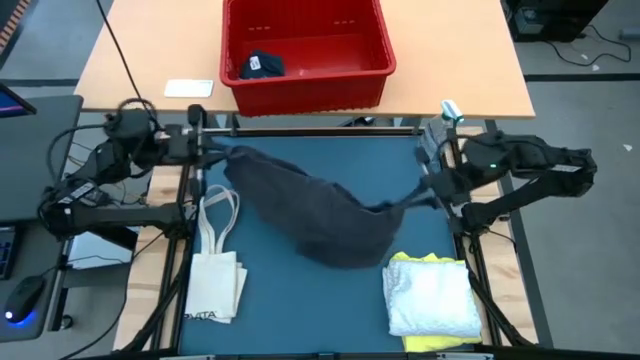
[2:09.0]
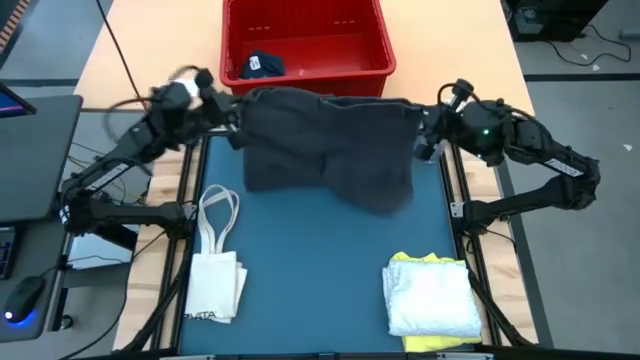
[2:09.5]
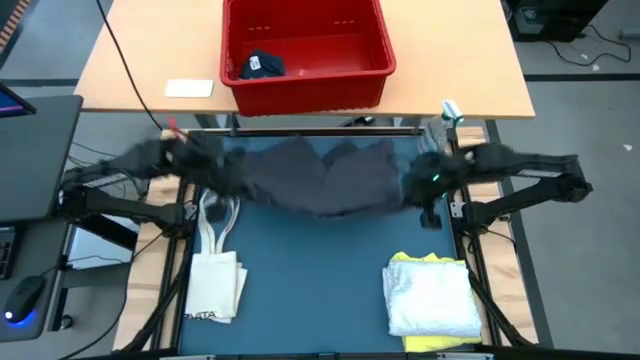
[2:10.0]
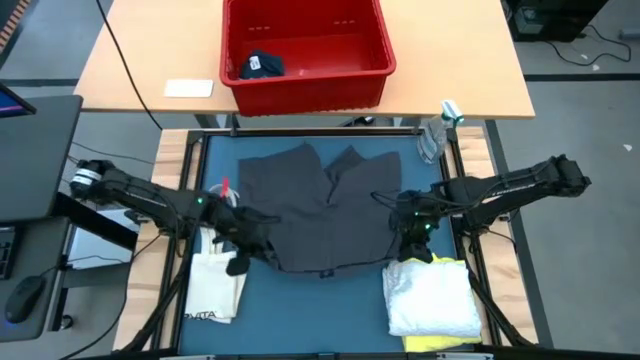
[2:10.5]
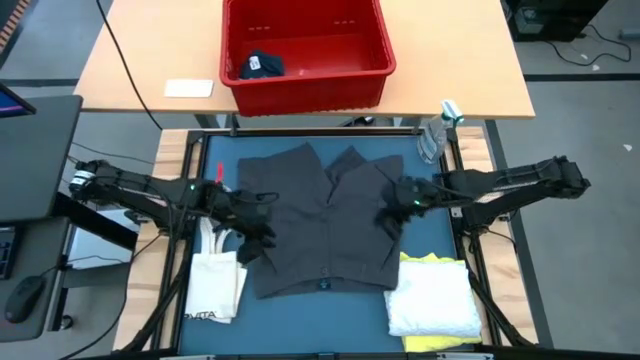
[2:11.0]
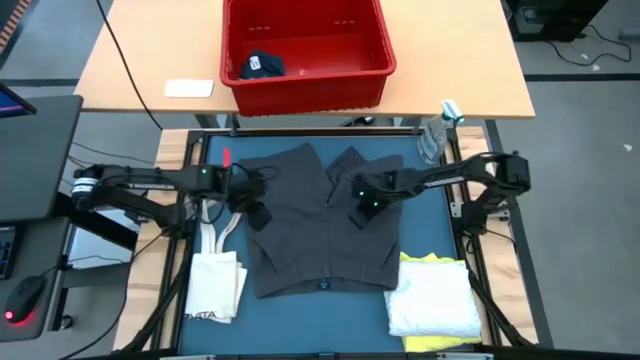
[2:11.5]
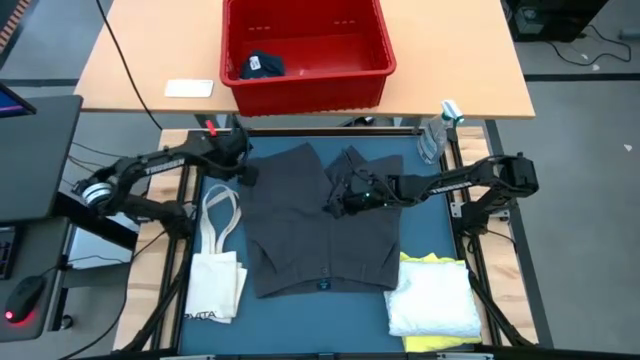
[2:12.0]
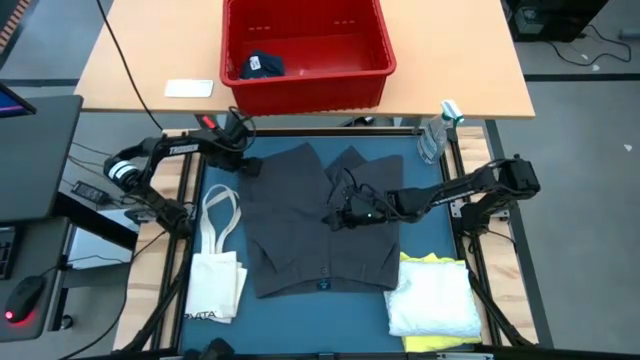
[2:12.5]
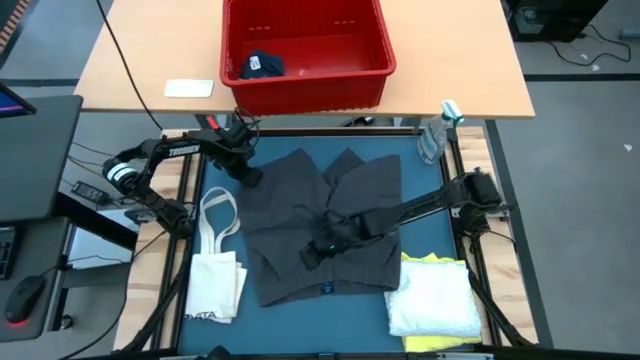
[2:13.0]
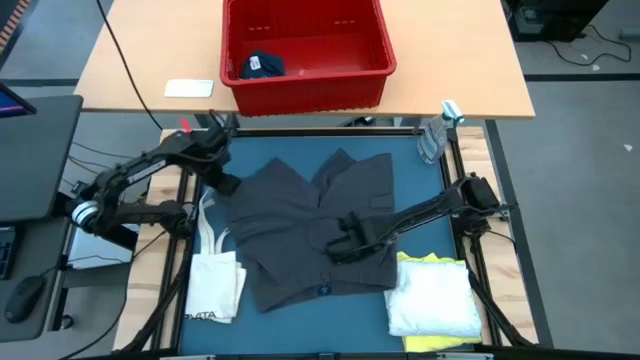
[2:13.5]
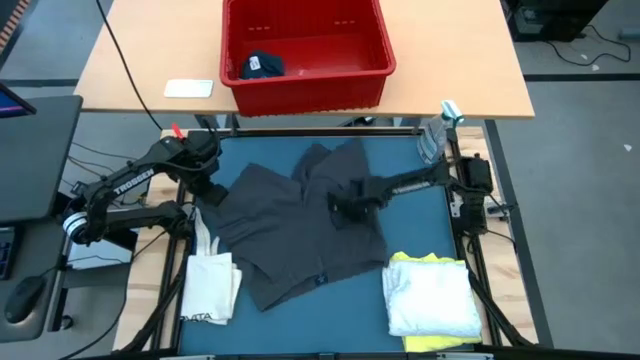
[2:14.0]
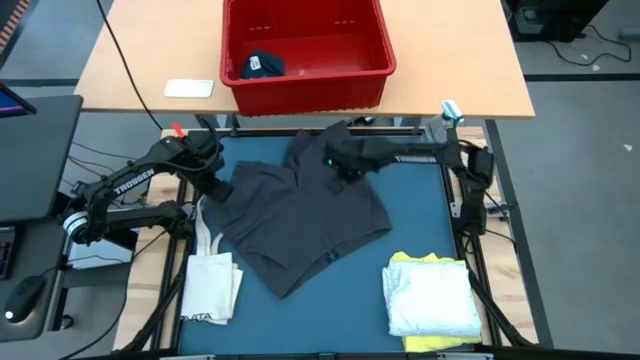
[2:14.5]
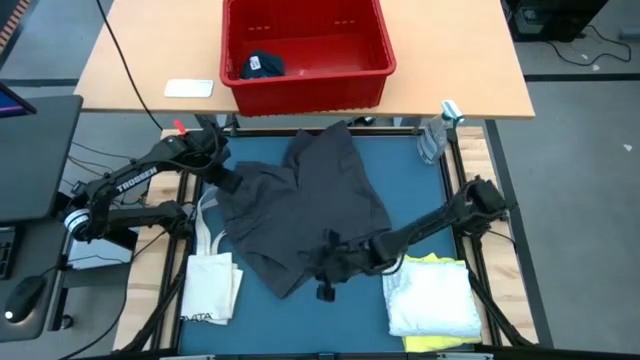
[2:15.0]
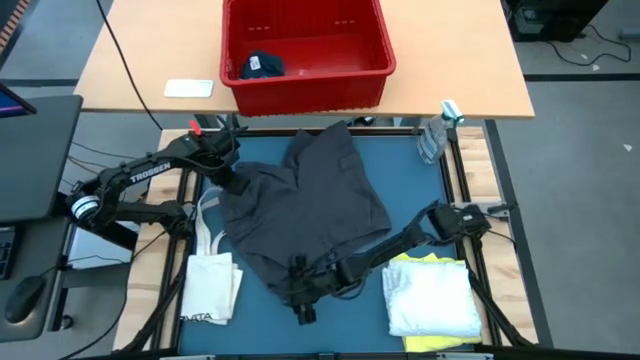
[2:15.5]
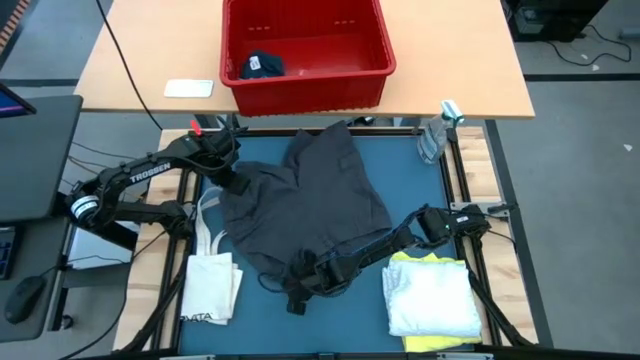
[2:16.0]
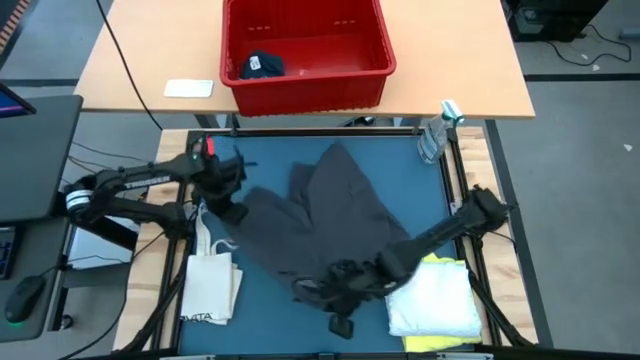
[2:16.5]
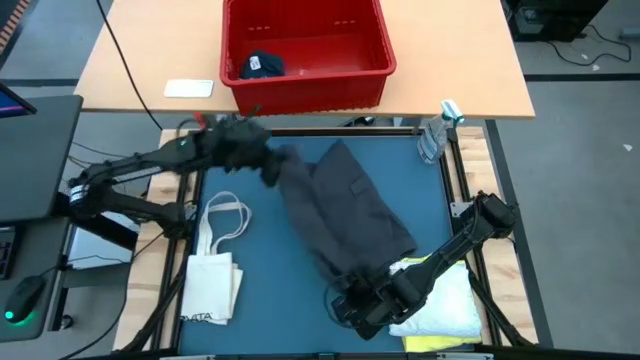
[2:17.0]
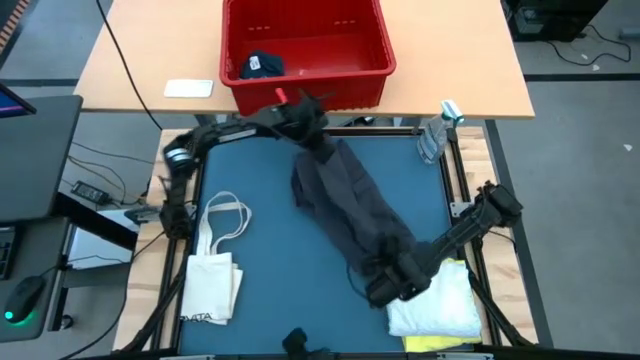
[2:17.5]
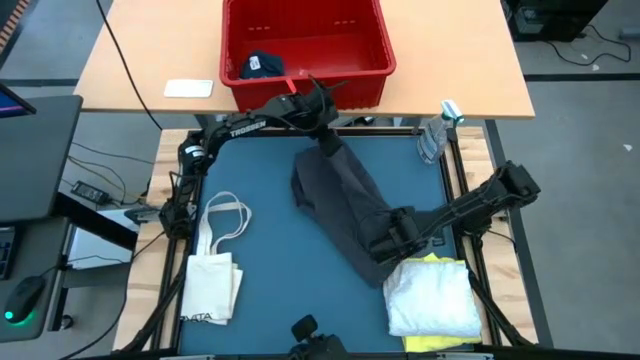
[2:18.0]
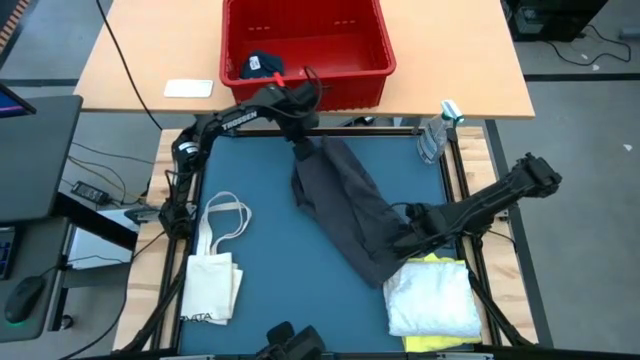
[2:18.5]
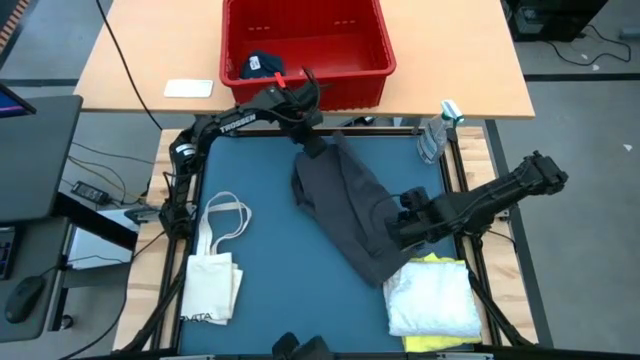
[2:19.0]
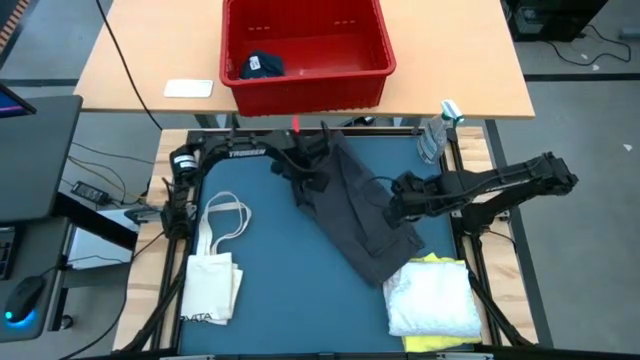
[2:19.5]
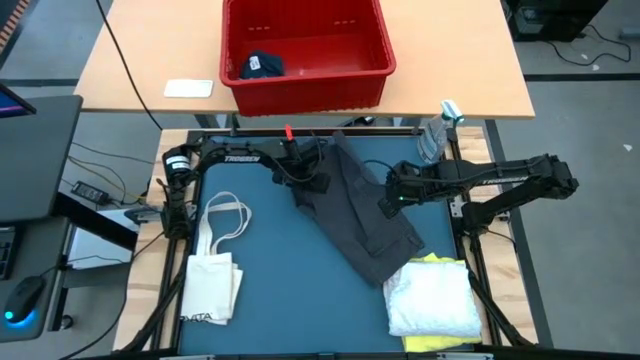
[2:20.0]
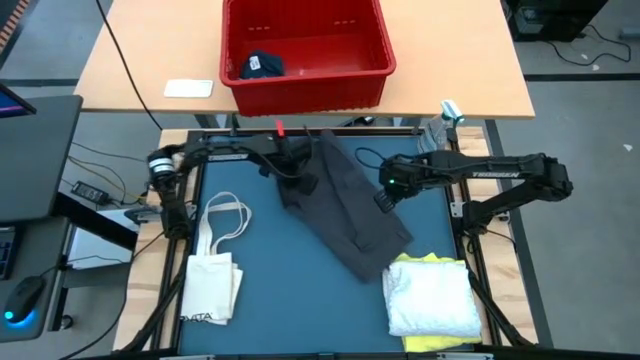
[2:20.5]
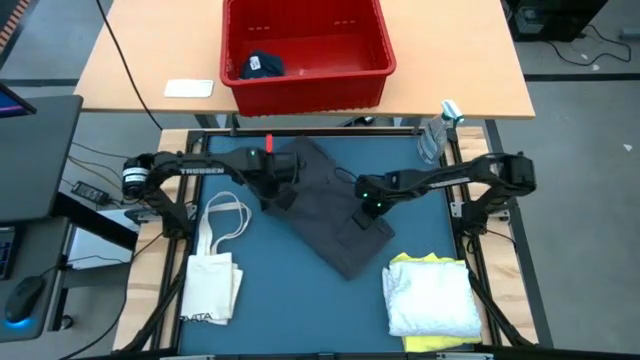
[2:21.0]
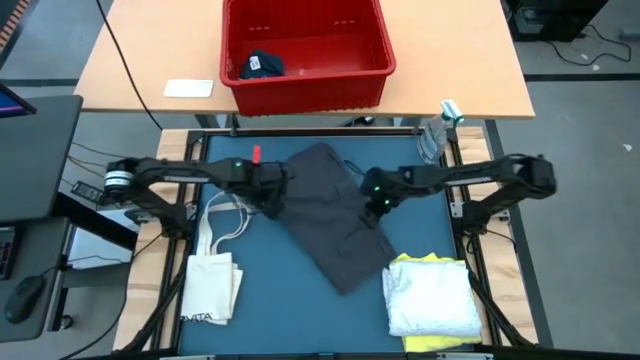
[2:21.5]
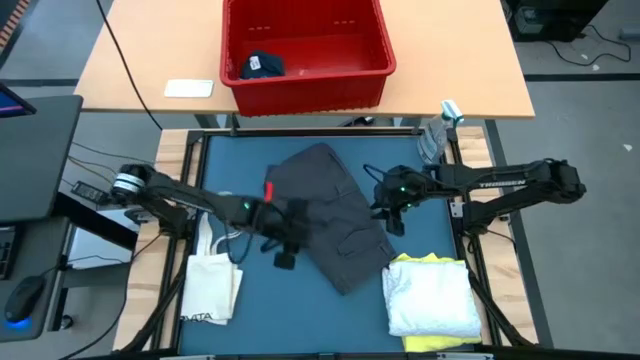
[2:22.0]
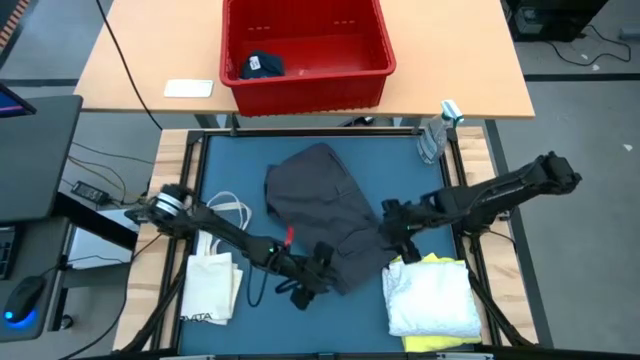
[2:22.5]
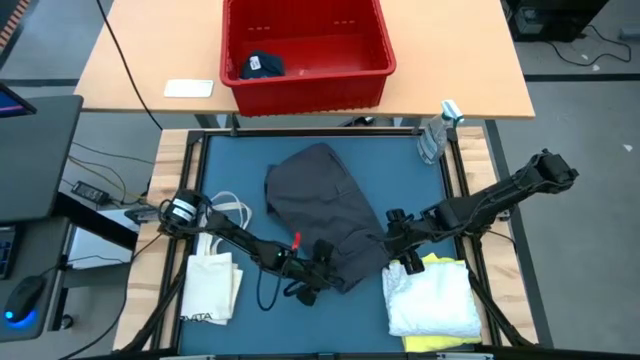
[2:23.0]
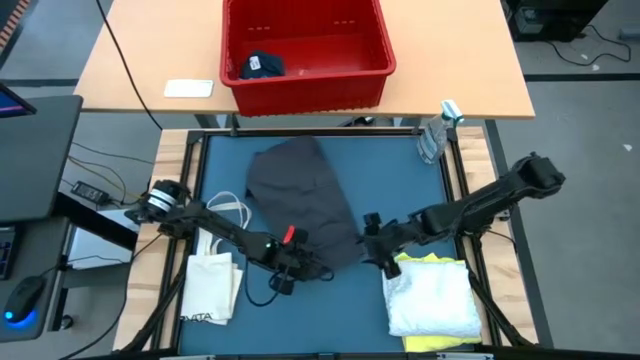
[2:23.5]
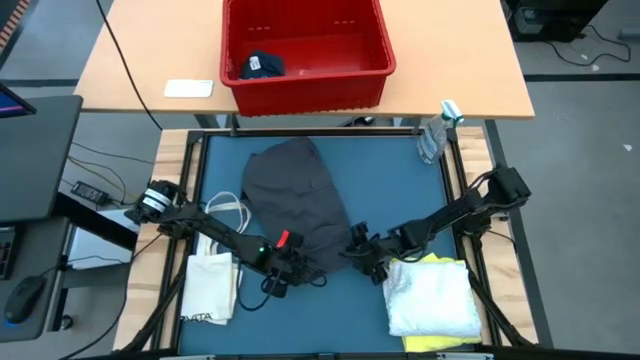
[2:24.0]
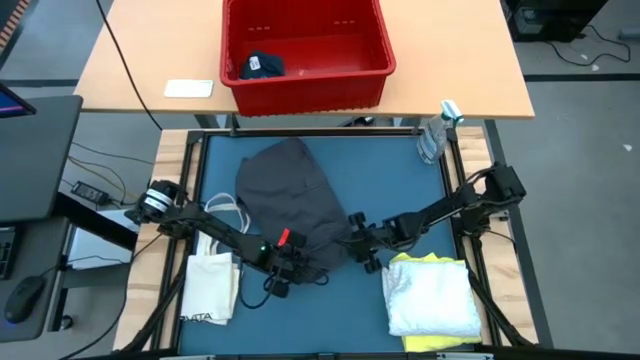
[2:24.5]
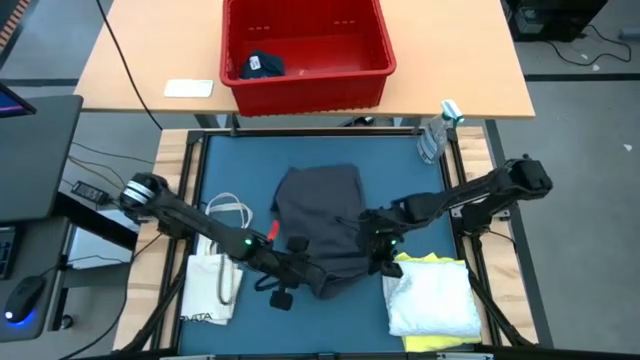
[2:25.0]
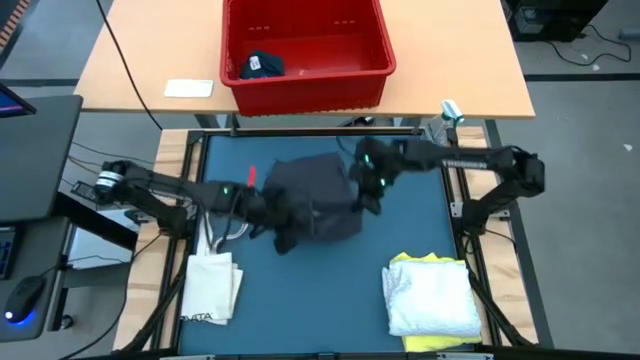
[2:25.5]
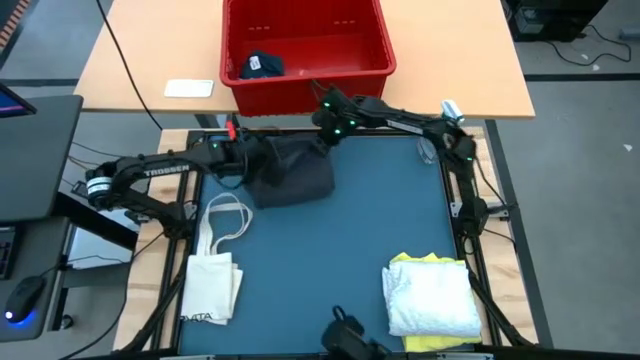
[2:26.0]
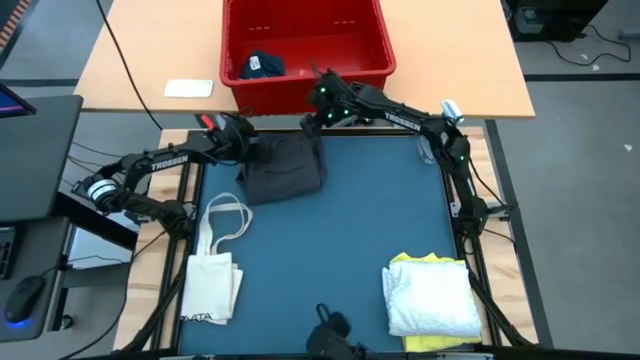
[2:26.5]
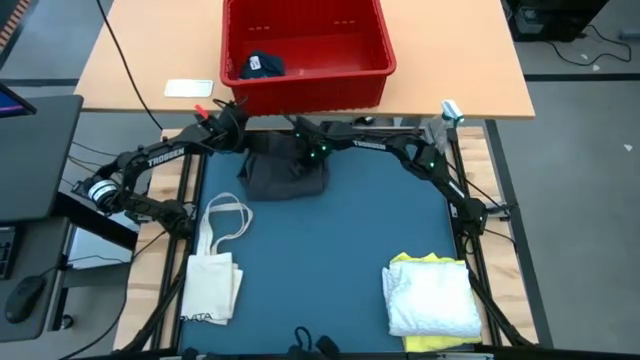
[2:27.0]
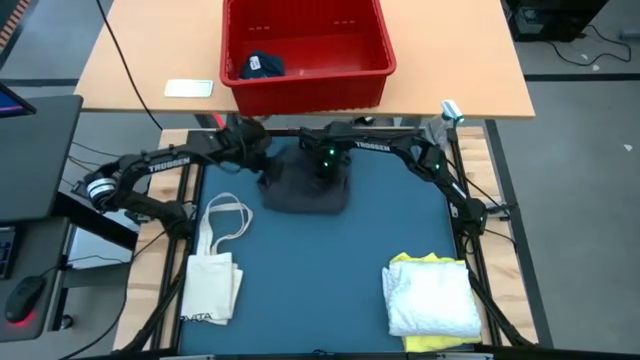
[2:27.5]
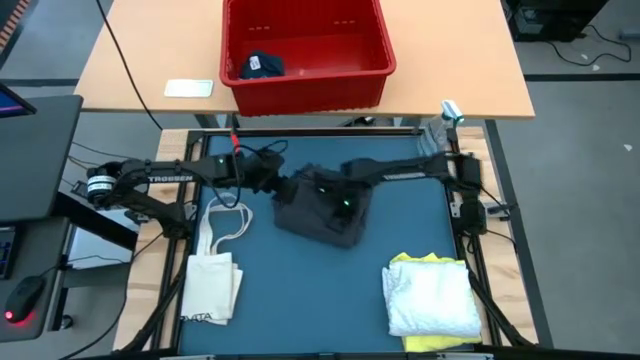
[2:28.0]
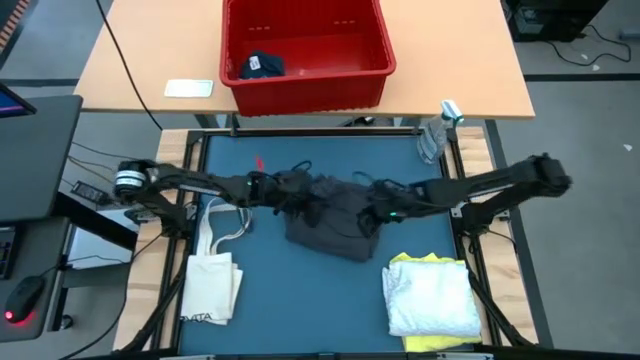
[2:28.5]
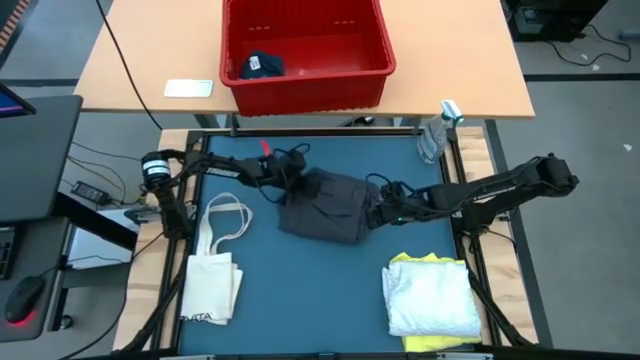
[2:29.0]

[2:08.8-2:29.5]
Task: Fold laundry
Fold the gray boxer

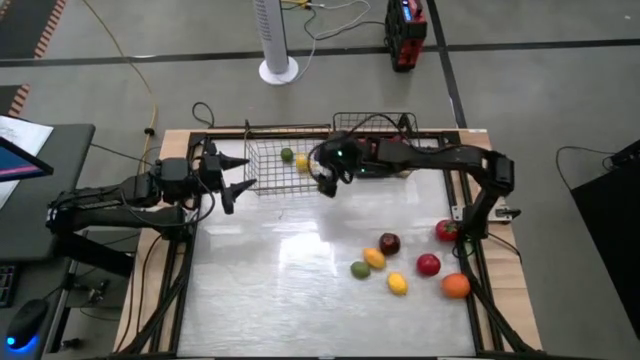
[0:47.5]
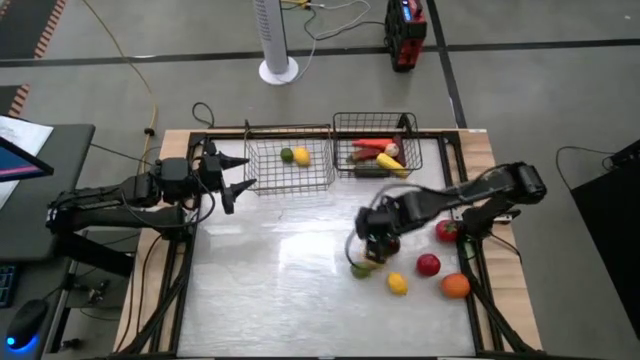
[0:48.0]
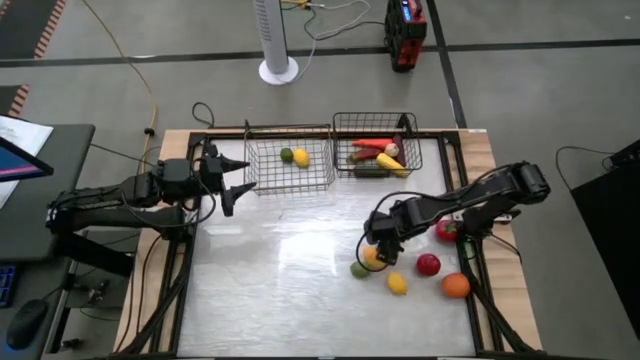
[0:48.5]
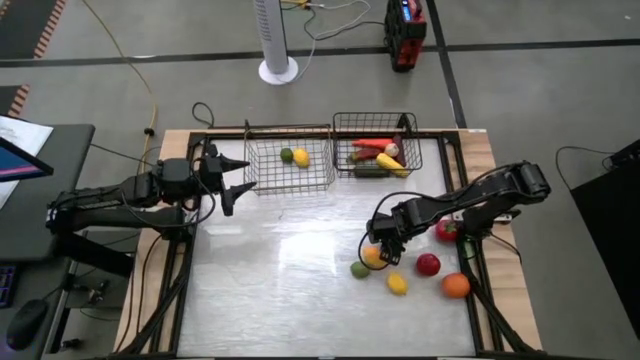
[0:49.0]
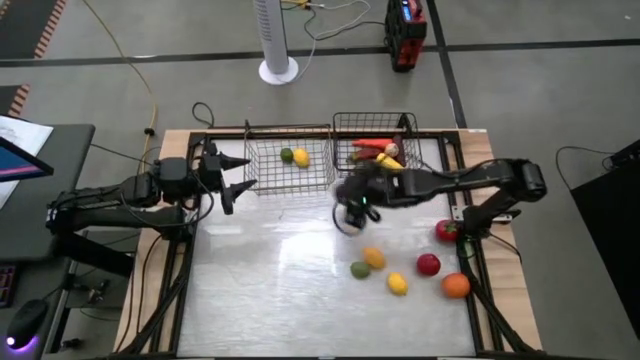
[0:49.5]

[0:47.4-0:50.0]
Task: Sort produce into baskets
Put the apple into the left wire basket
